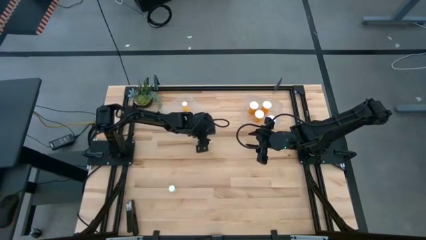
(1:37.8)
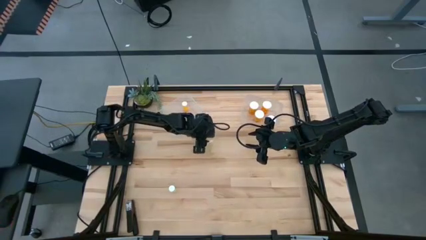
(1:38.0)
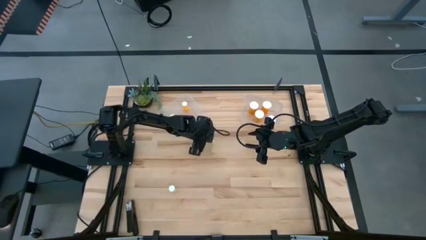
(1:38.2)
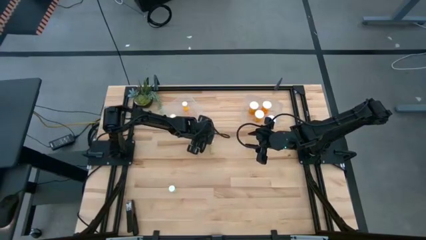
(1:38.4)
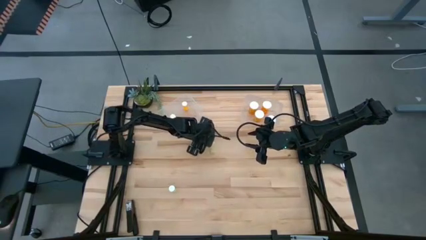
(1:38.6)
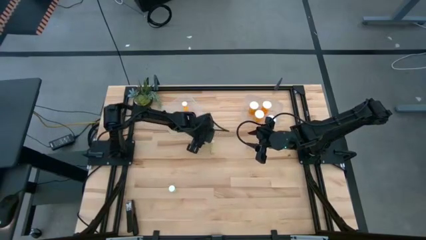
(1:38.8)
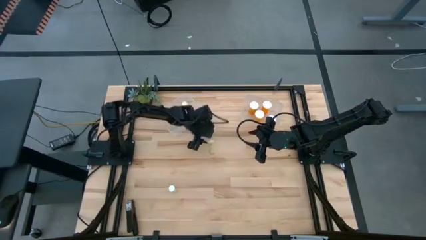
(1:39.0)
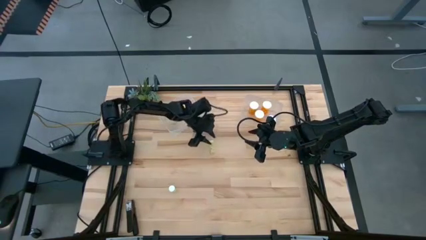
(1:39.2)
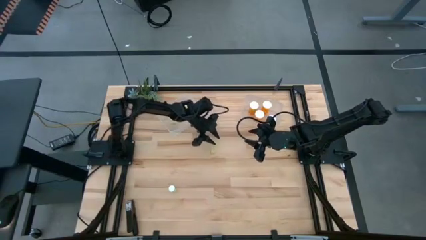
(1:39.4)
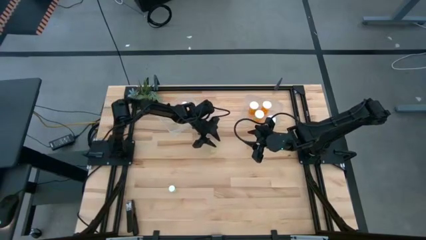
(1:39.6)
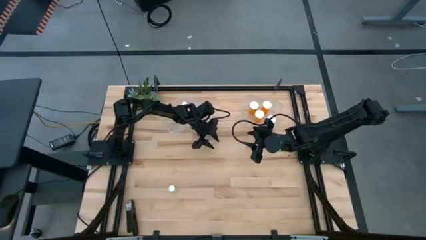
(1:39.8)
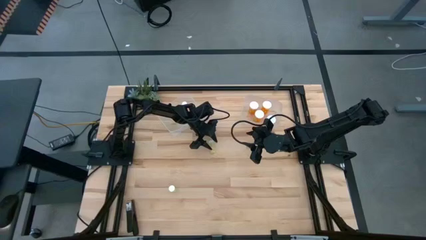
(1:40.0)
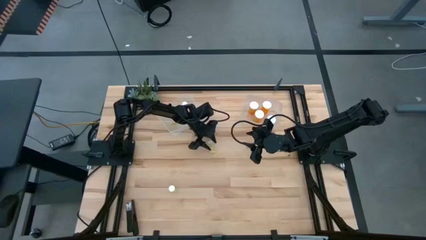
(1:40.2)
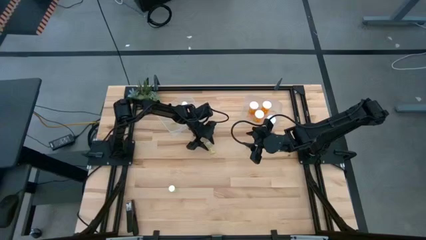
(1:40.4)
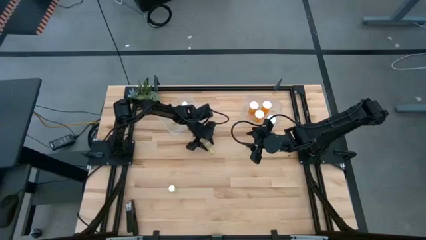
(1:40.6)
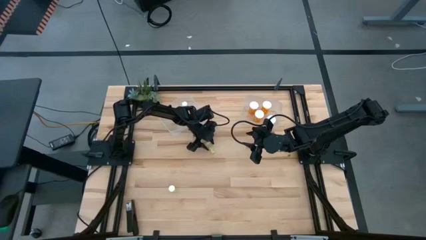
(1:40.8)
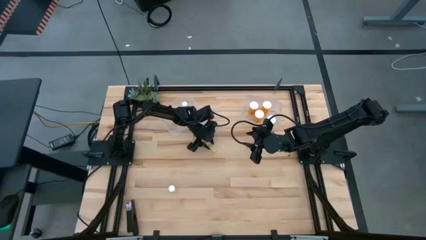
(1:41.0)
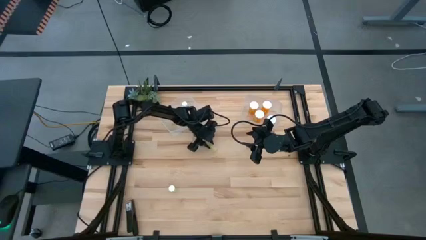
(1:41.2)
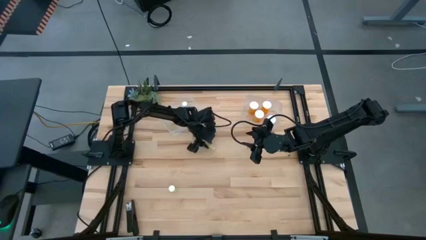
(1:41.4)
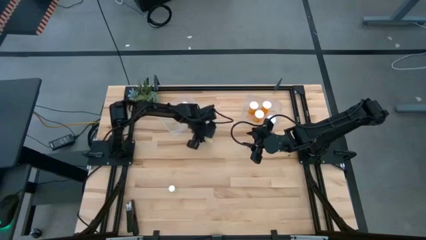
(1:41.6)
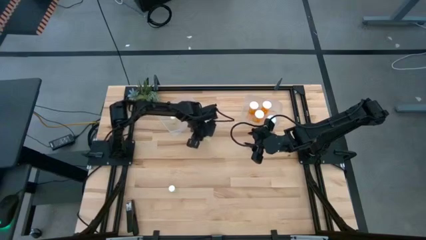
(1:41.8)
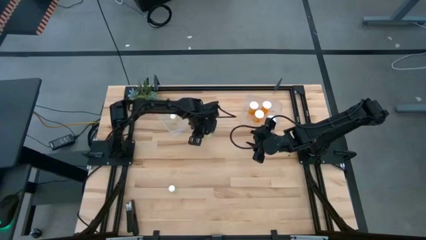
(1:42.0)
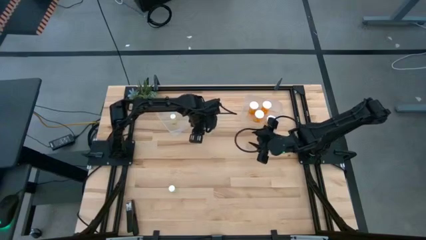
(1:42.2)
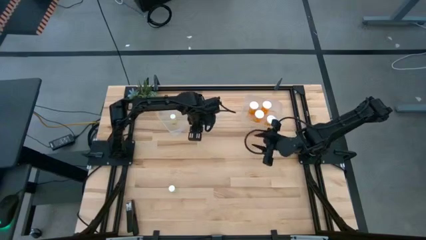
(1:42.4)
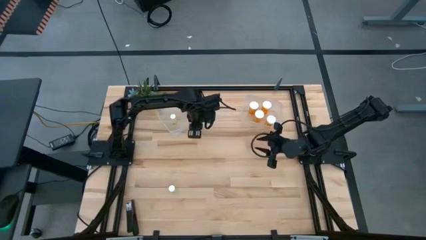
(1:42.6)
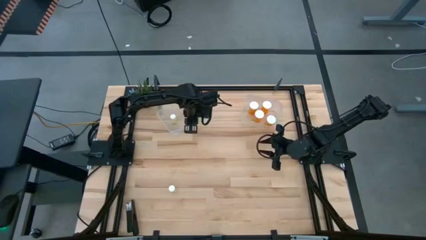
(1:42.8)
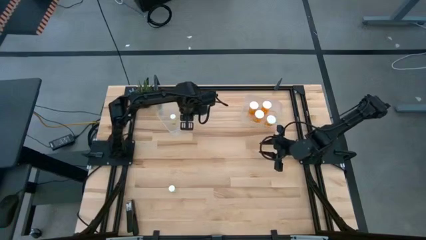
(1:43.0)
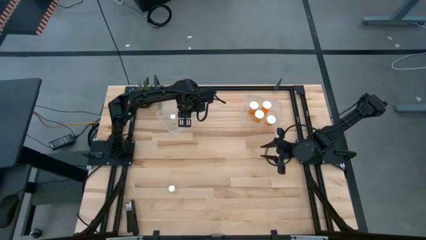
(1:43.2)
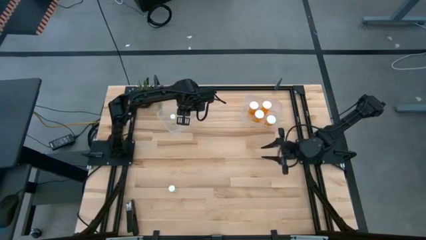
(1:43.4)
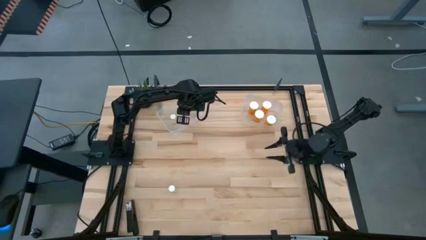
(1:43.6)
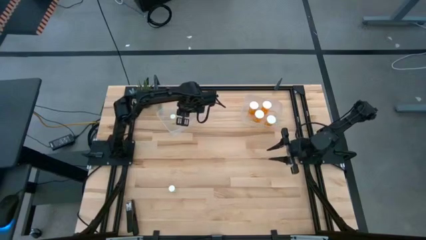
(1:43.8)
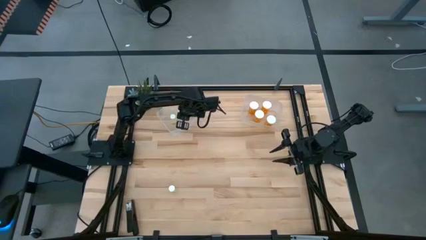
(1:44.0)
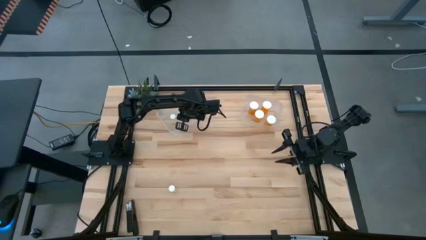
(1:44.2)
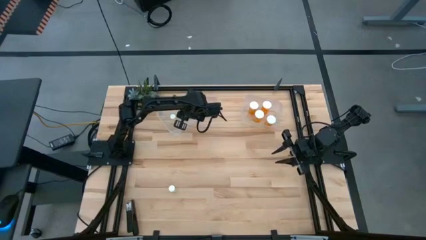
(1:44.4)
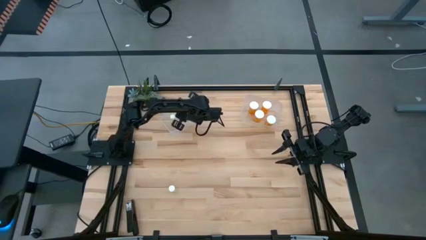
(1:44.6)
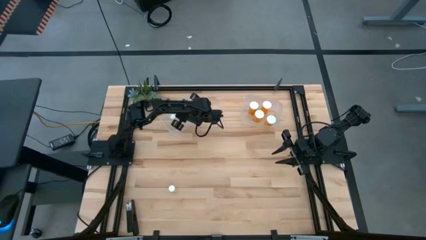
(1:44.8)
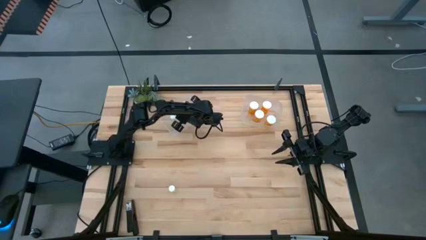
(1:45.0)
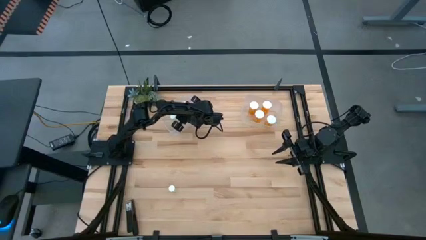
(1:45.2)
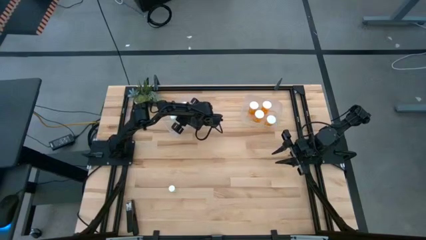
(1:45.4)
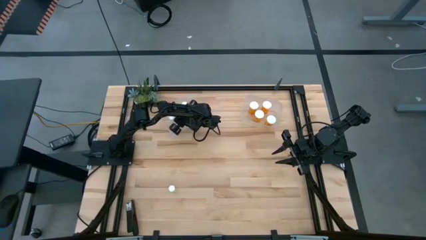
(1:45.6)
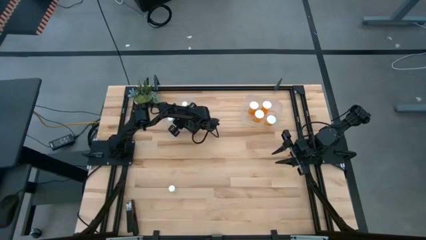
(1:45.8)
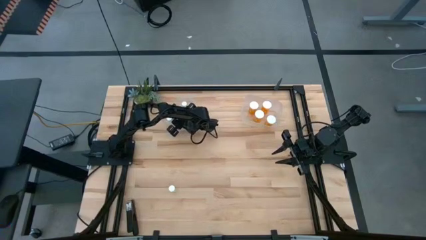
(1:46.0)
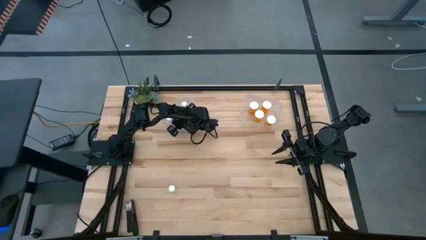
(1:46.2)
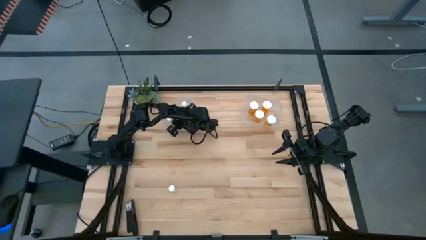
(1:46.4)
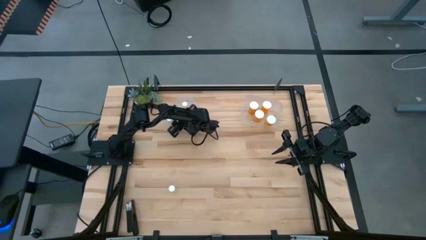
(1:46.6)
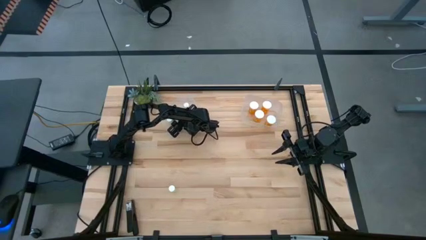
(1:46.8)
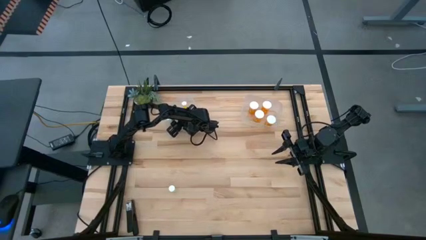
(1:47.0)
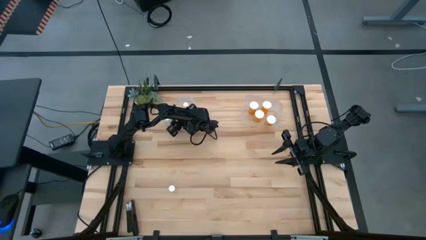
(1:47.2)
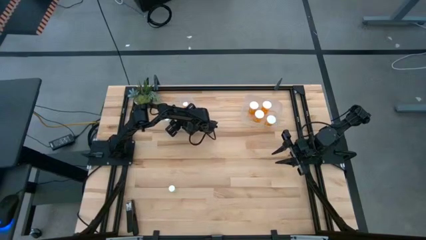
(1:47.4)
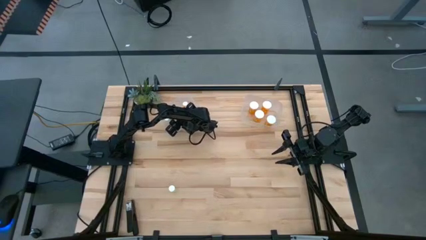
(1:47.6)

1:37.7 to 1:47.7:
Task: Pick and place medicine bottles into bin by pill shape (circle, oval)
Put the small yellow pill bottle into the left transparent bin

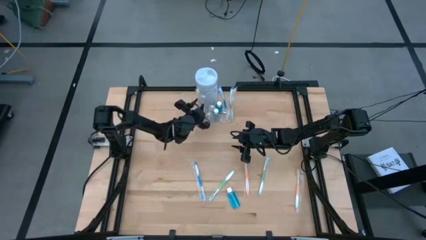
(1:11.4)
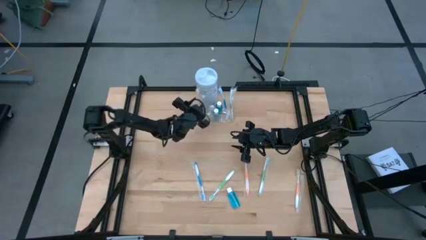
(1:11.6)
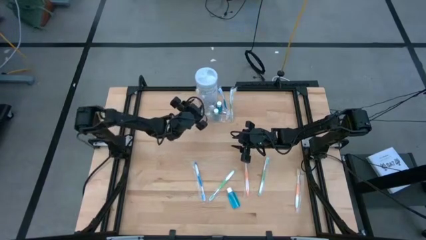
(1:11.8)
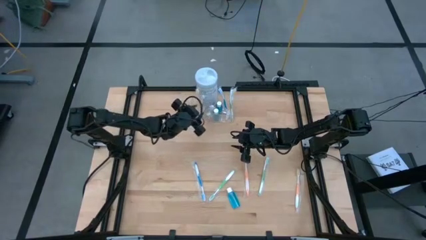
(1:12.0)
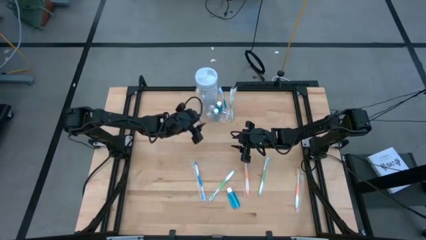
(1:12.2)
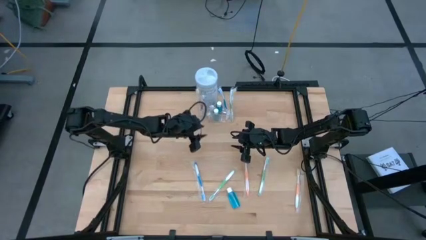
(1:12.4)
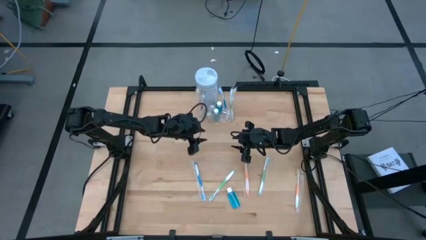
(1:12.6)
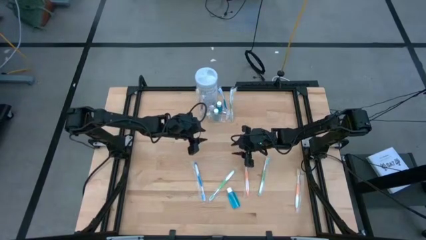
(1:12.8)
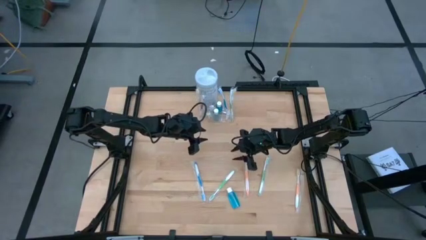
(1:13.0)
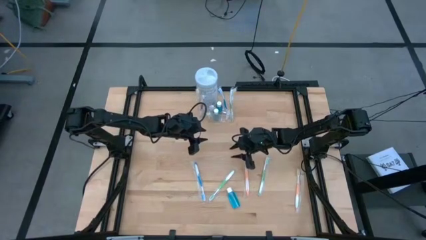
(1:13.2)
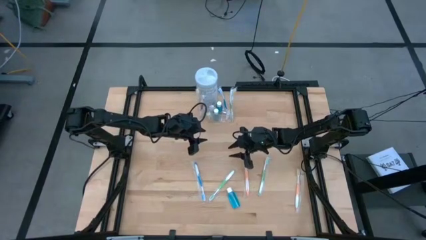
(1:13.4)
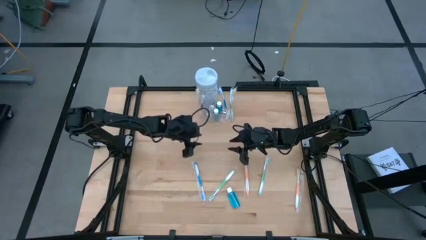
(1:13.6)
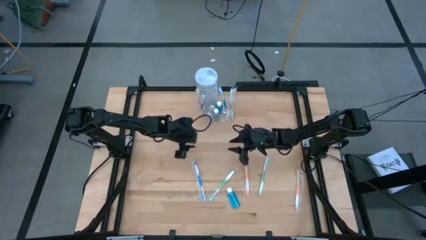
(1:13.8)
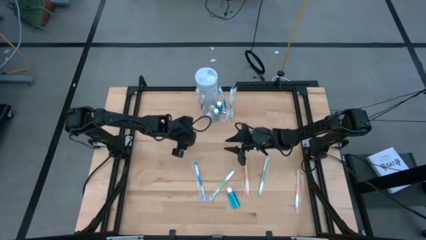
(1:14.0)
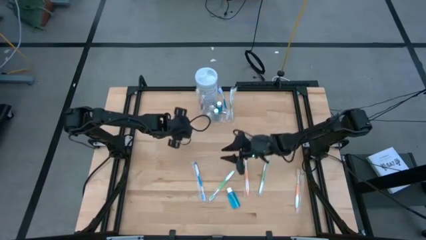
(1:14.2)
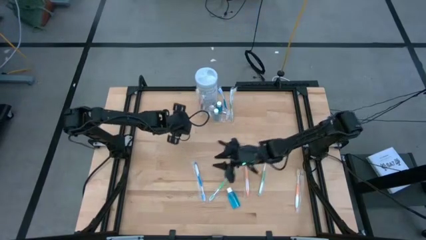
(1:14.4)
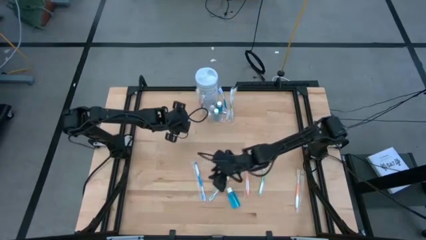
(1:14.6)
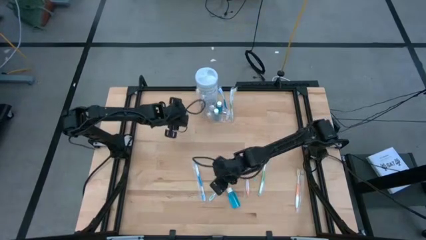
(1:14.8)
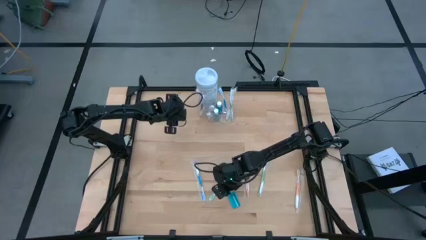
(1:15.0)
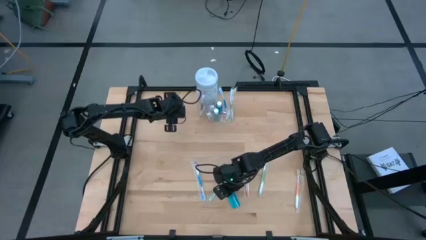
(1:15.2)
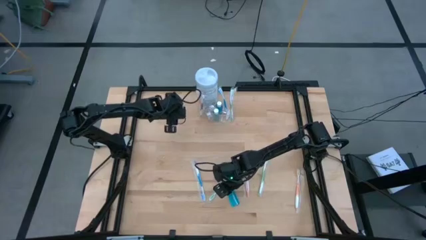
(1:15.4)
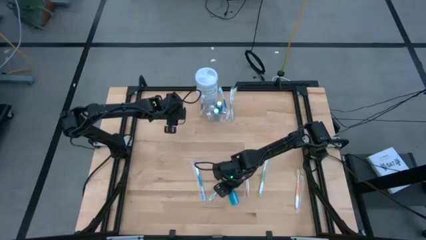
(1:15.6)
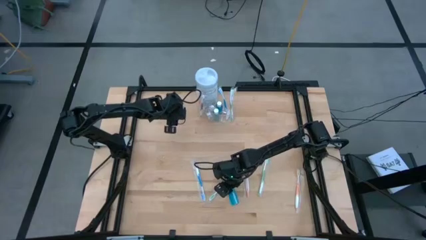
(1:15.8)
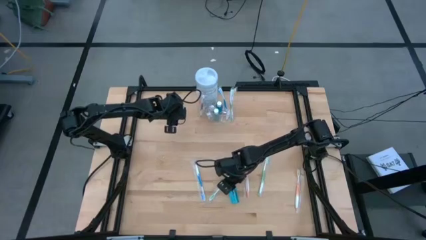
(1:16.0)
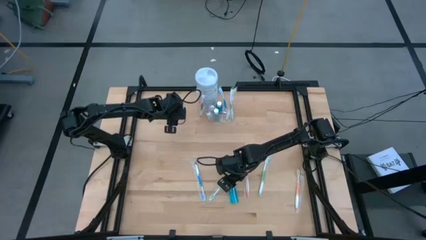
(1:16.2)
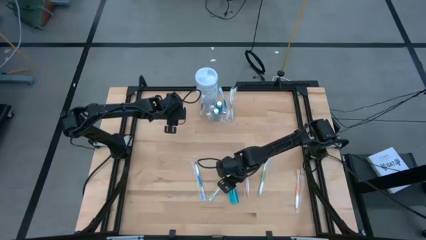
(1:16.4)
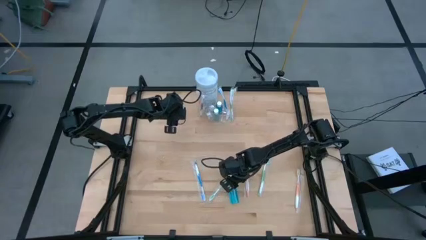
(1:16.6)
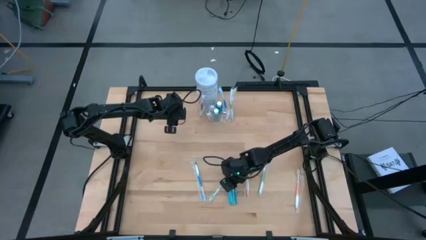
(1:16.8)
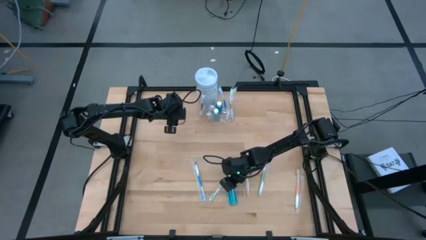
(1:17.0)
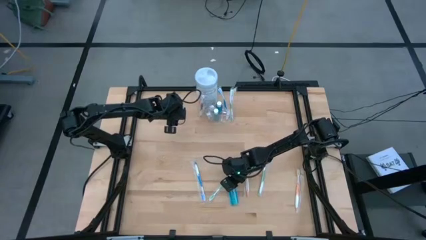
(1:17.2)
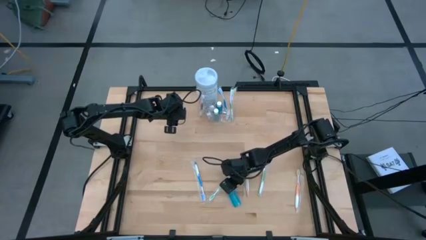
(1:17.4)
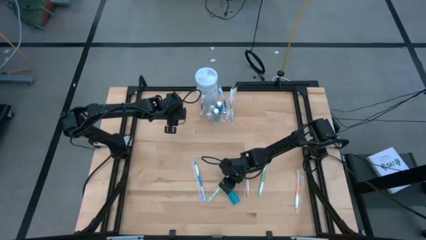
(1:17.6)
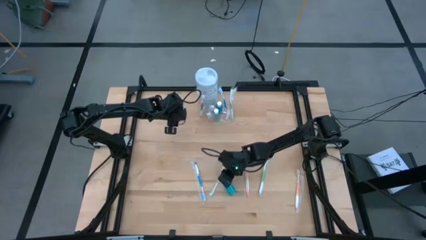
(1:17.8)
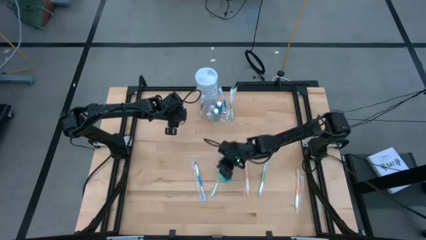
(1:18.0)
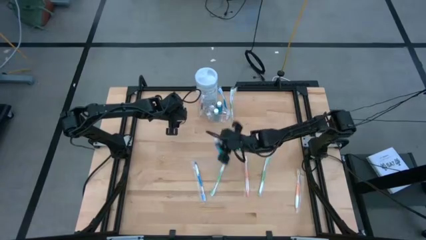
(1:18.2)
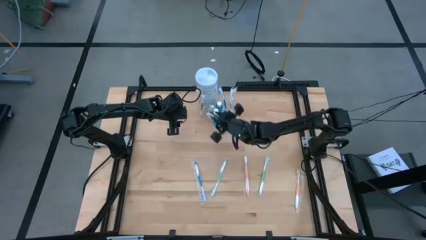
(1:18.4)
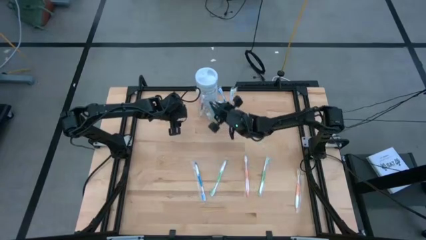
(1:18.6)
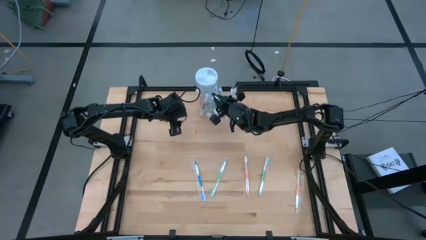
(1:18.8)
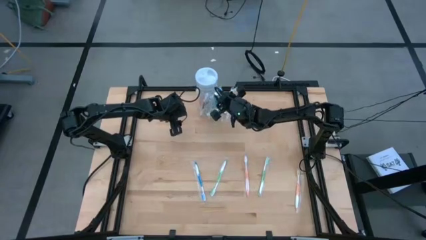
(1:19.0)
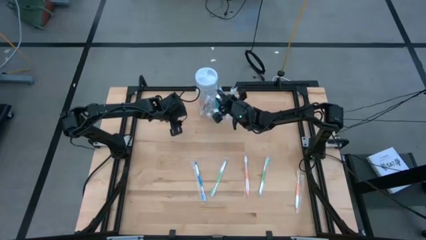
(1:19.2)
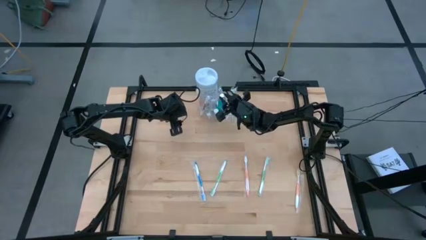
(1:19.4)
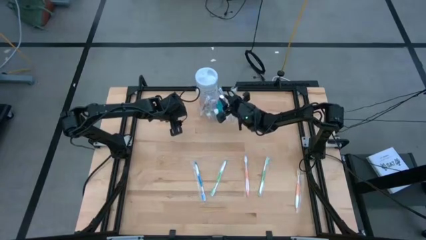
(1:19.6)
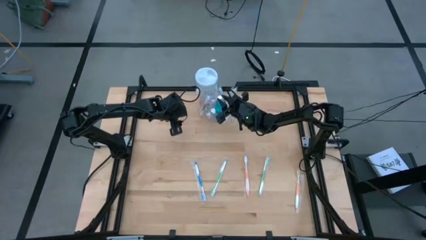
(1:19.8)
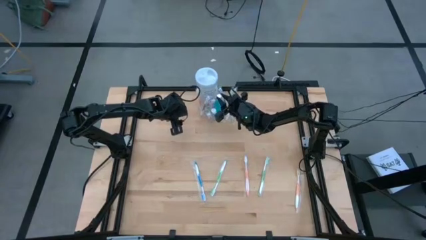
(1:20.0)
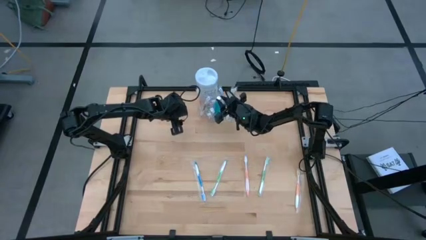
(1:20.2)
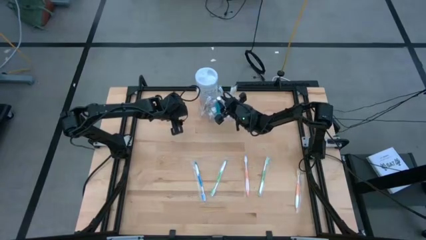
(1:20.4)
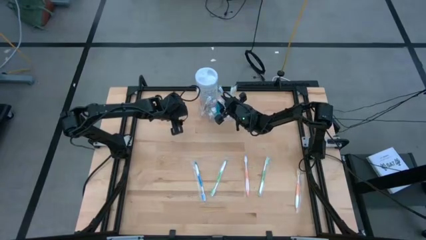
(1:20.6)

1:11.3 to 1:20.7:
Task: Pick & Place toothbrushing station
Put the blue mouthwash bottle into the transparent organizer
